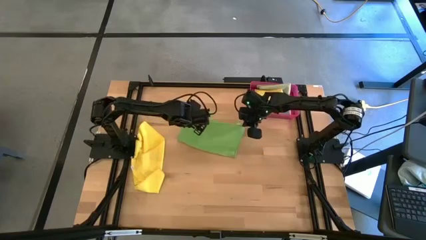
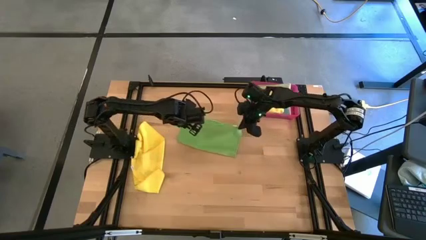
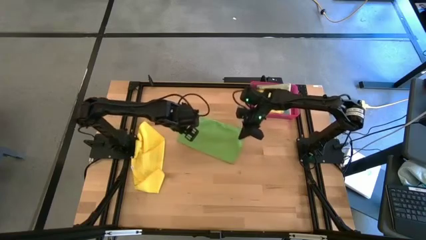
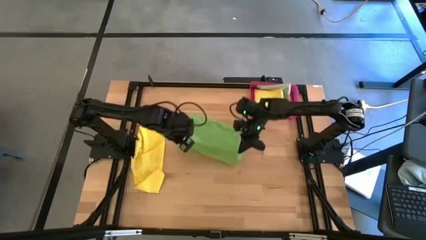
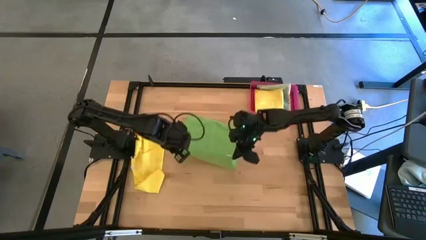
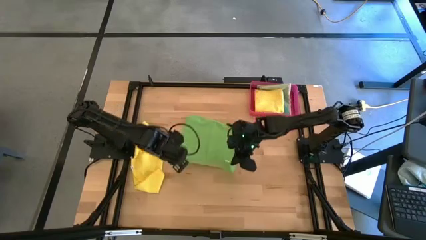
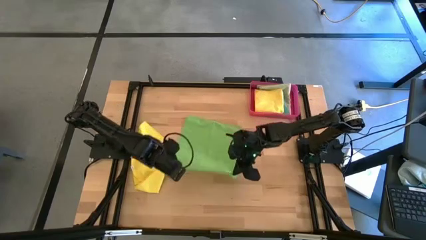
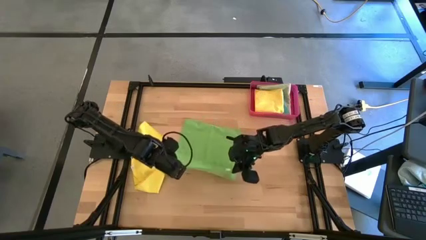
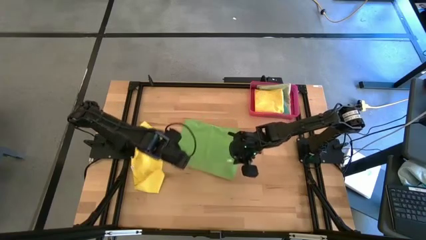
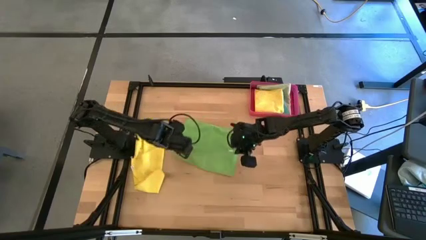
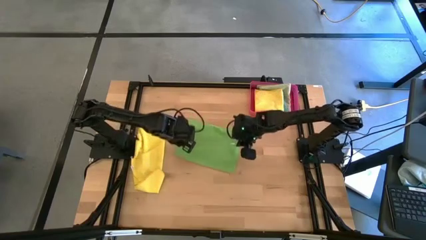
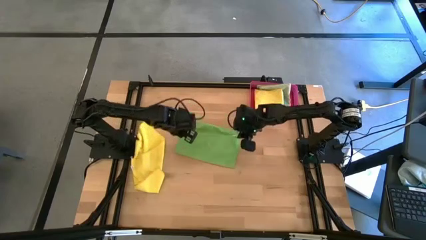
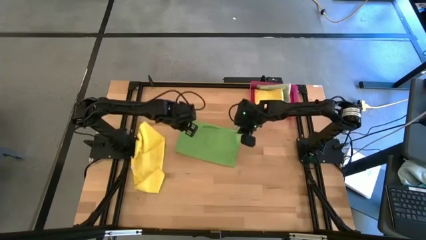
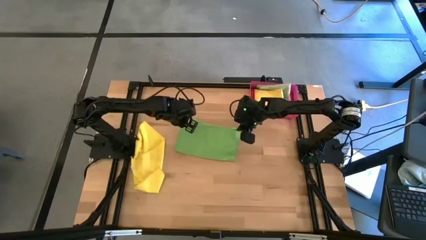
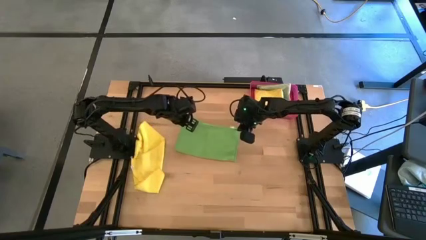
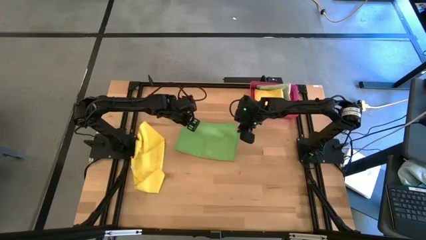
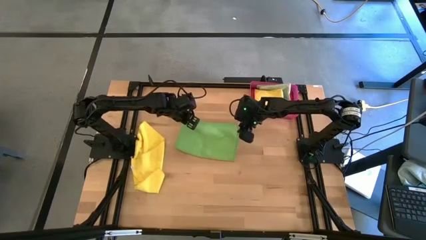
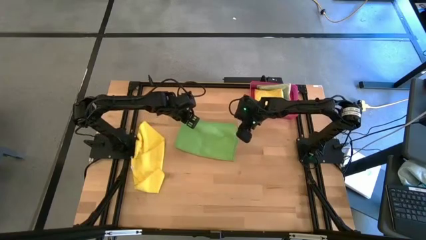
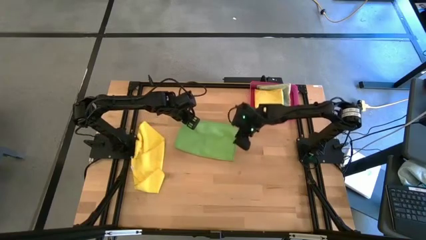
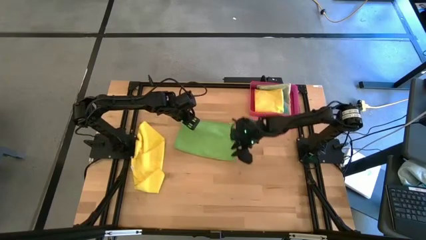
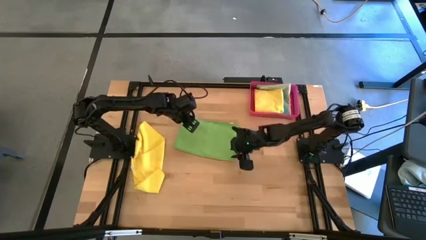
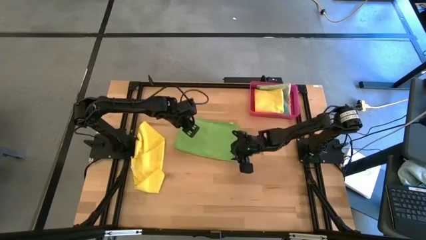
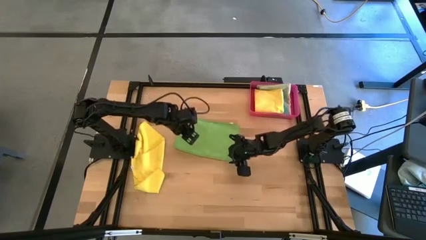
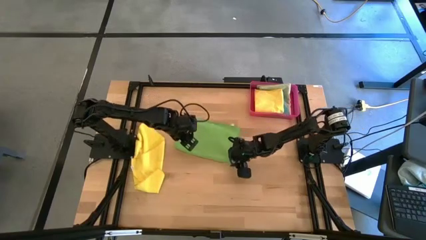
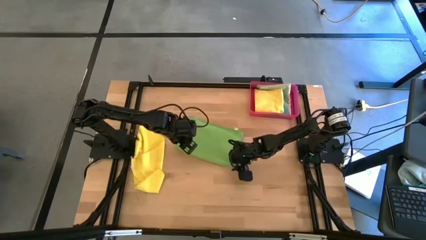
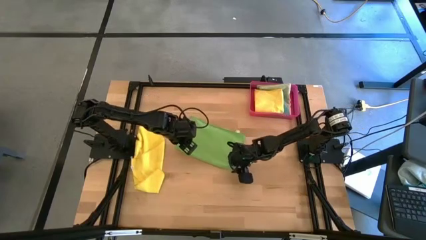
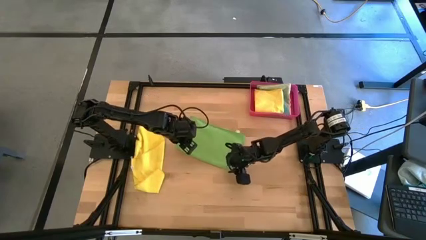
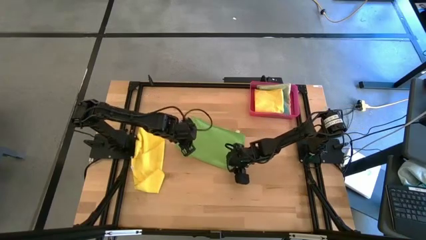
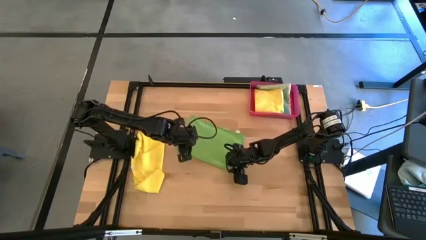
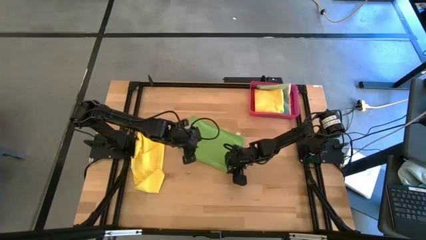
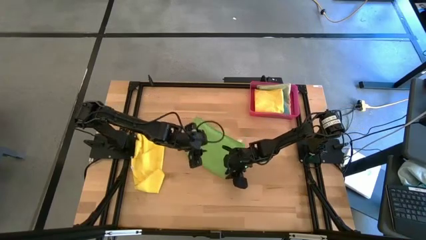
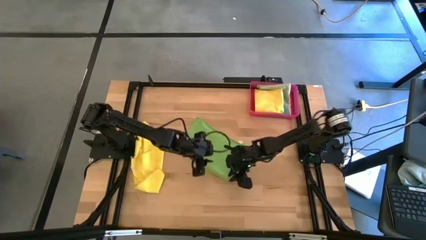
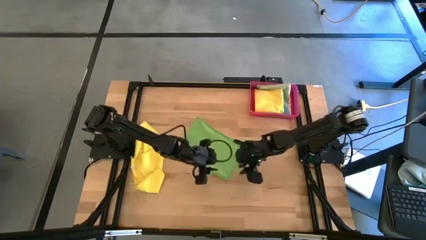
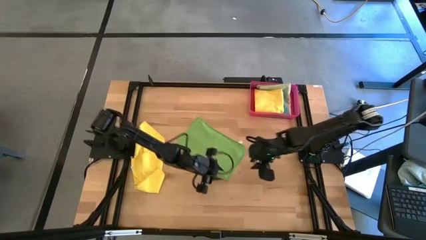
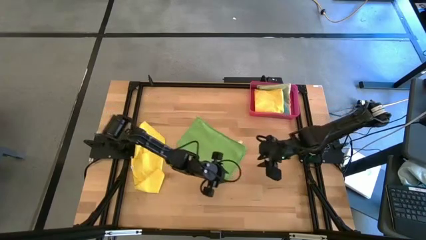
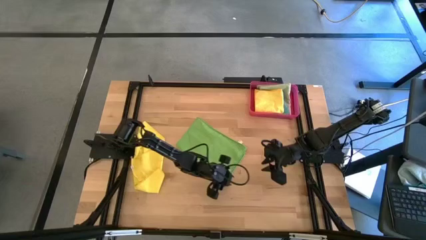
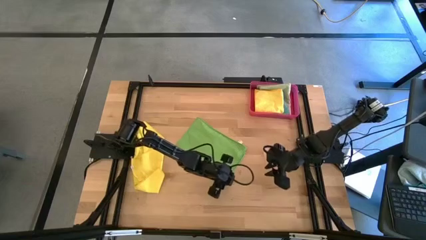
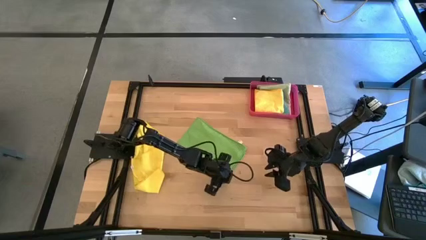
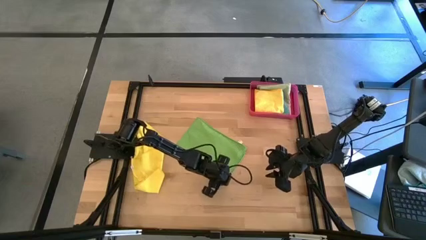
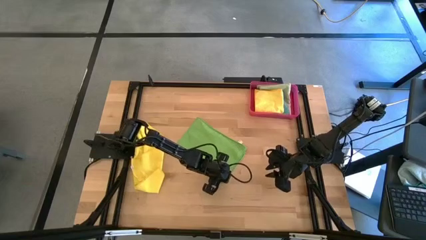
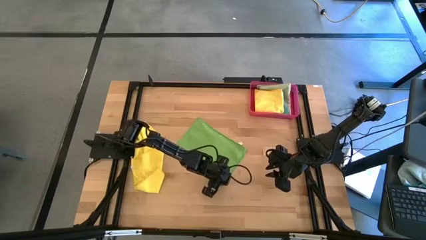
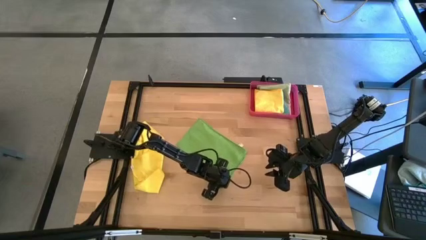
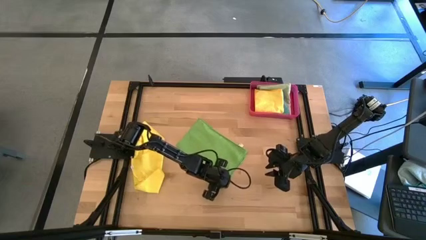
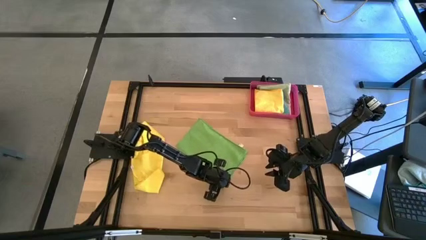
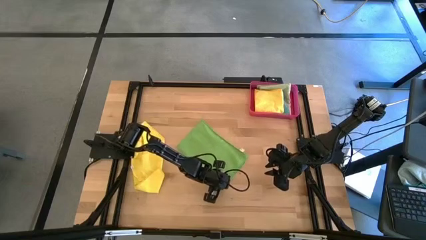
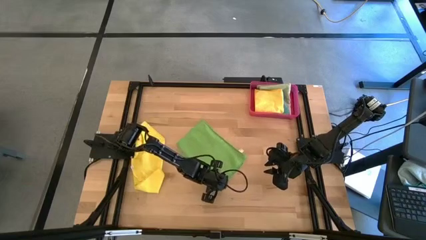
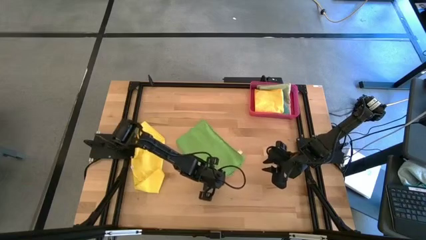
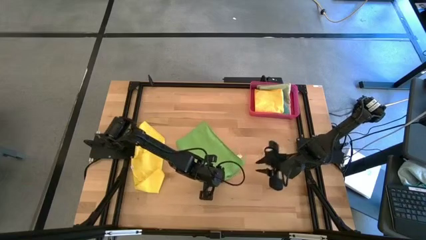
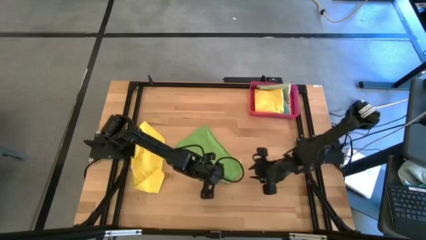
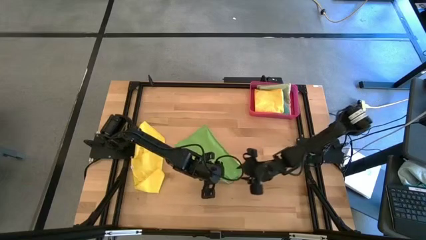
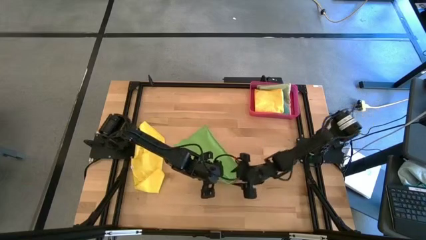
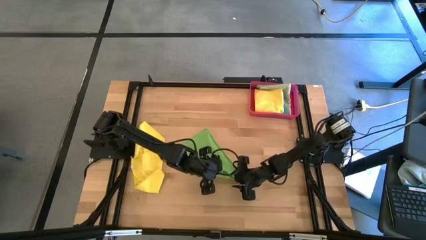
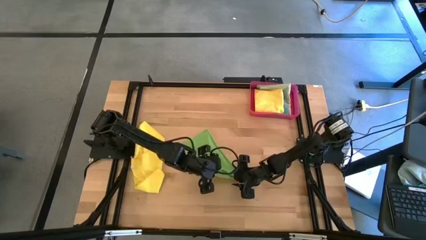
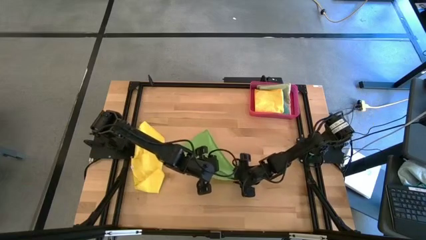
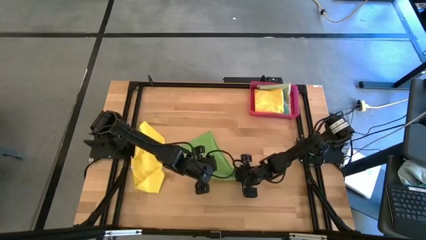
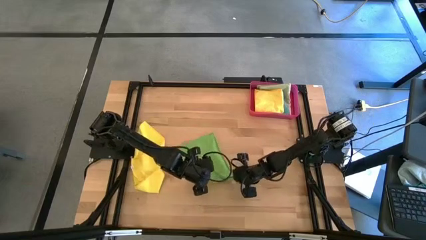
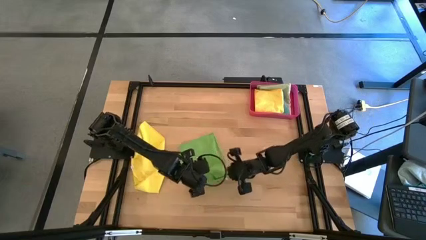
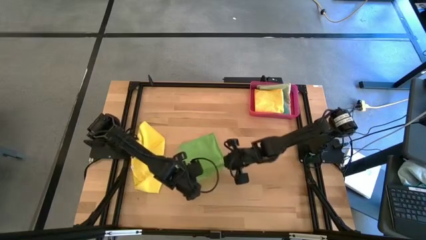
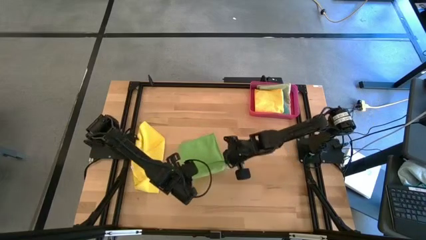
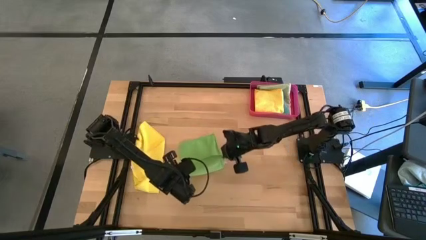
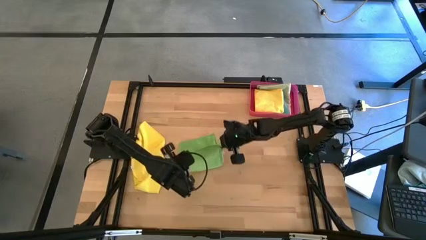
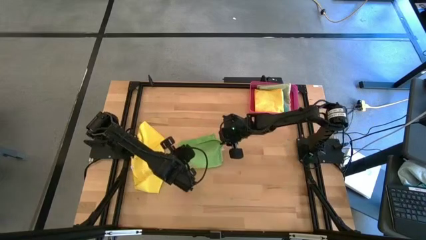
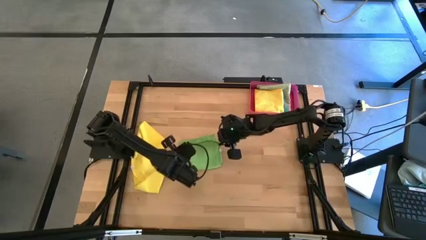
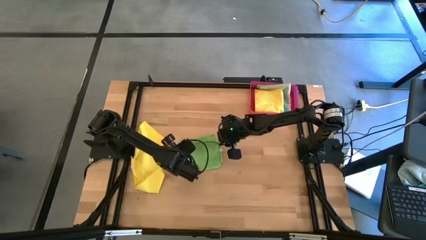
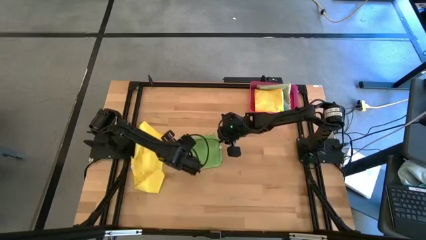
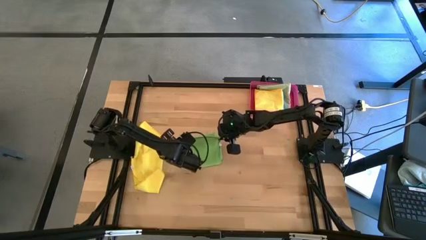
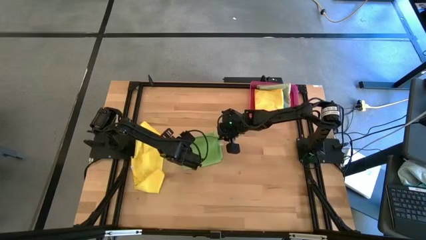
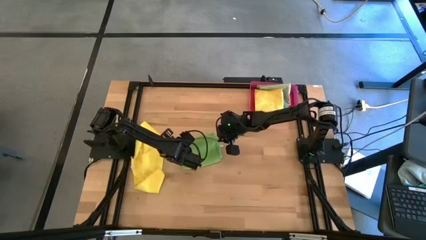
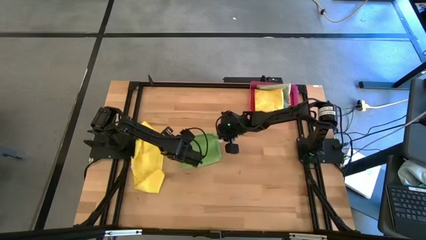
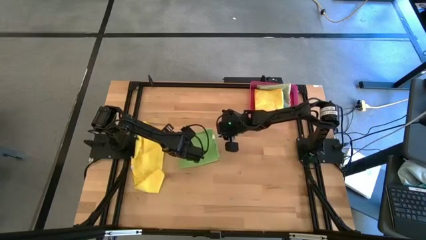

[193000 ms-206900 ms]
Task: Fold microfiber towels
Fold the green towel

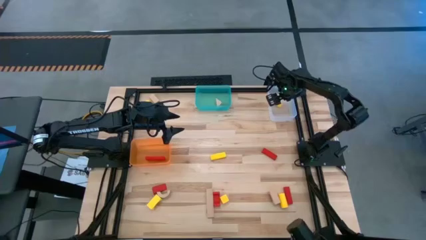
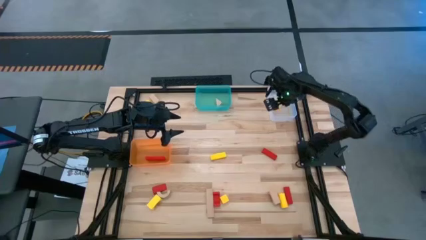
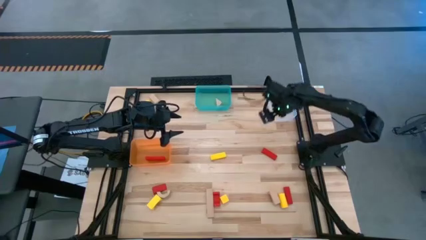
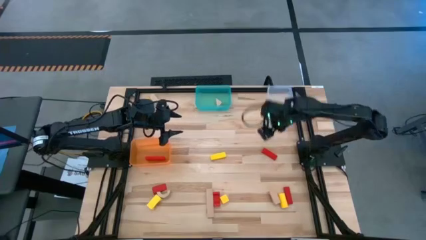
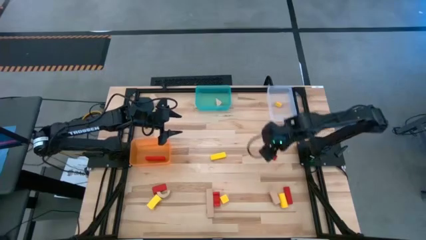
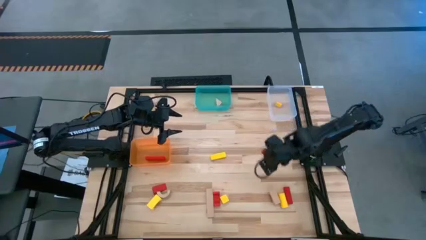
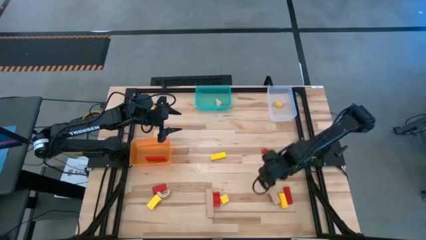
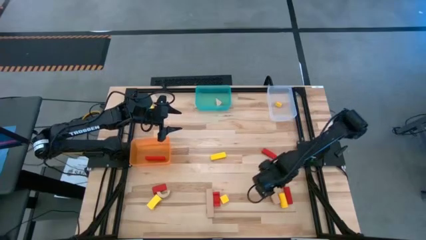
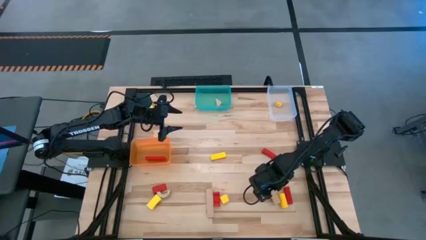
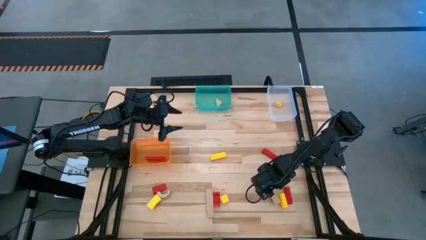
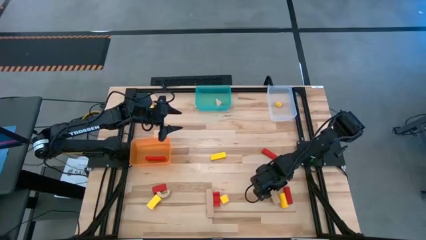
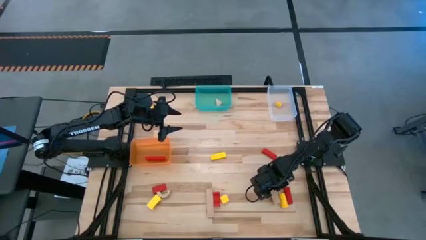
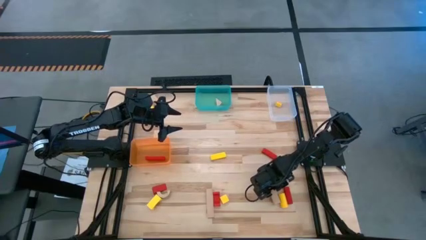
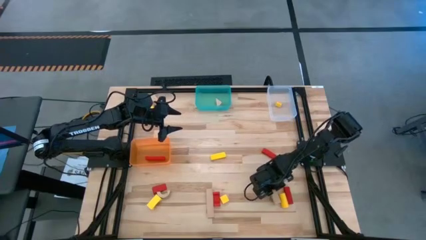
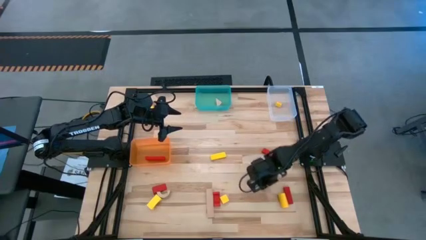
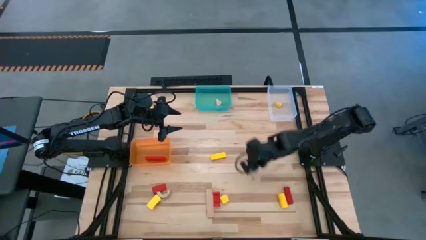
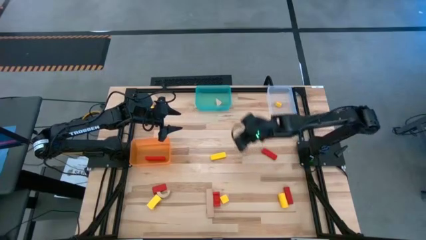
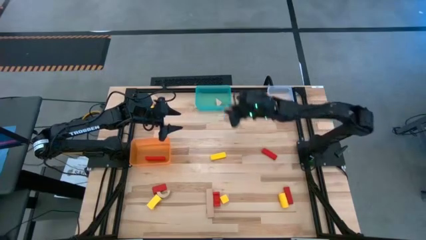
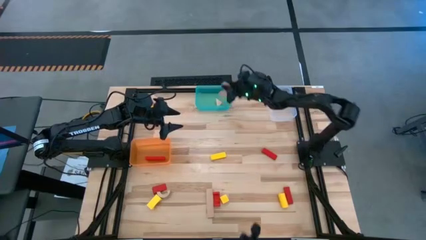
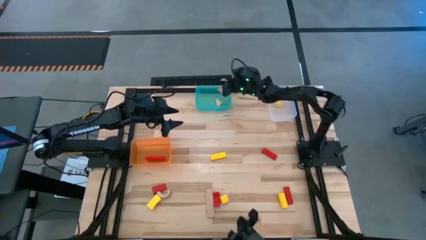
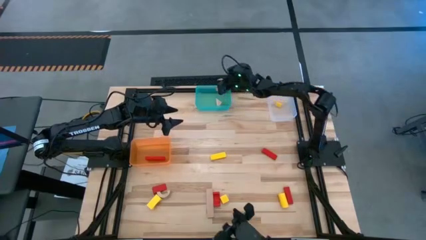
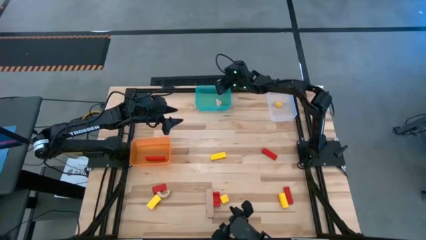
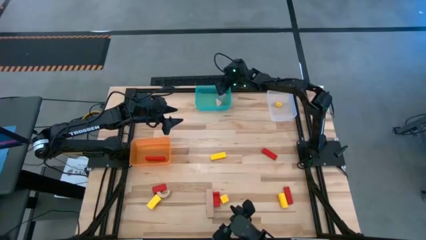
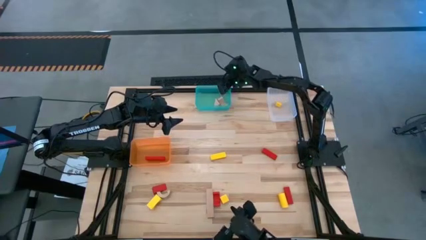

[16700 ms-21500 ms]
Task: Sort & place blocks by color
Put the brown block into the transparent blue bin
